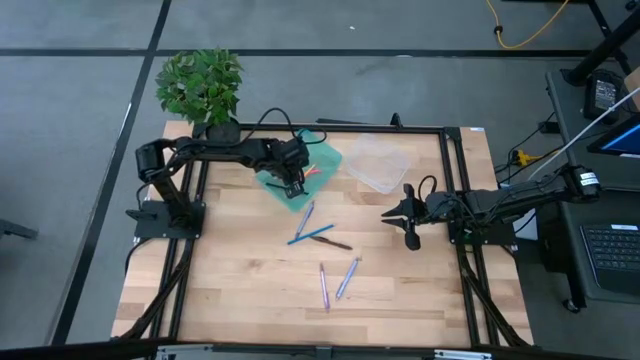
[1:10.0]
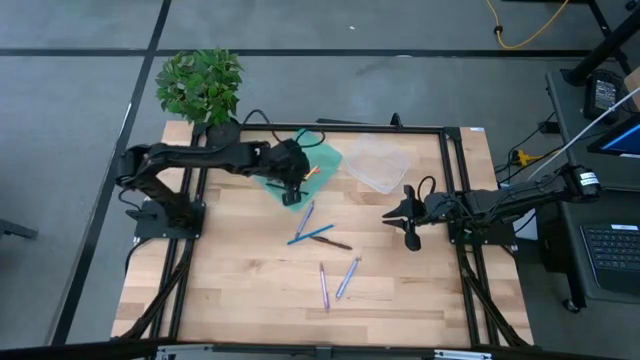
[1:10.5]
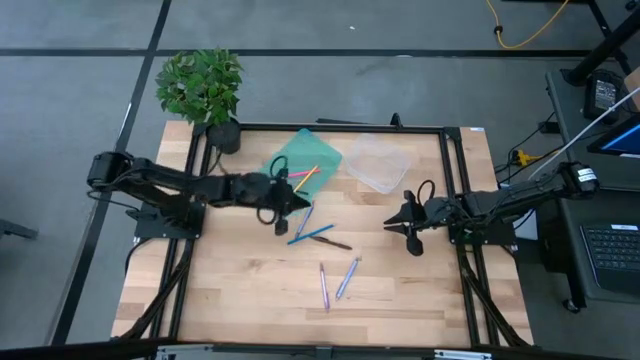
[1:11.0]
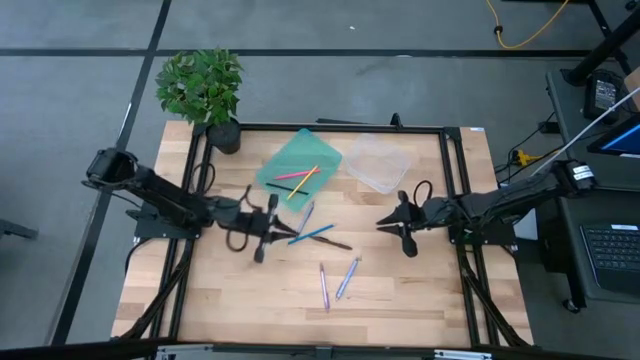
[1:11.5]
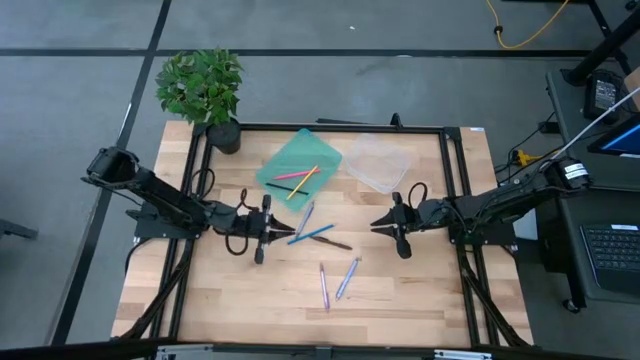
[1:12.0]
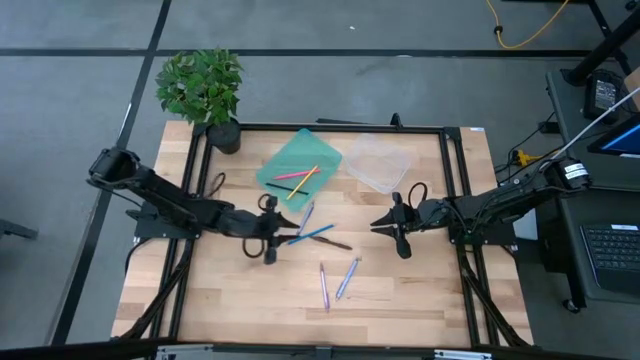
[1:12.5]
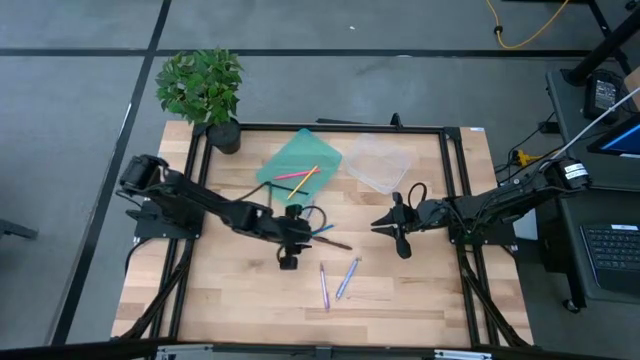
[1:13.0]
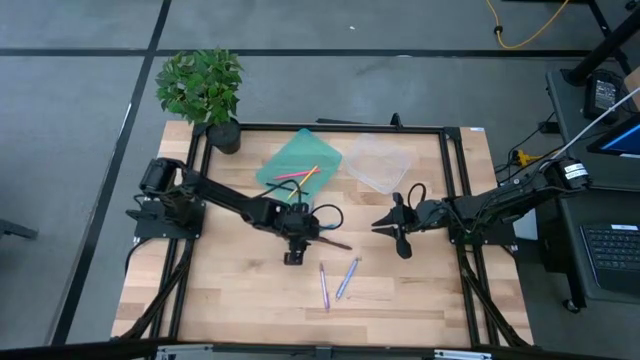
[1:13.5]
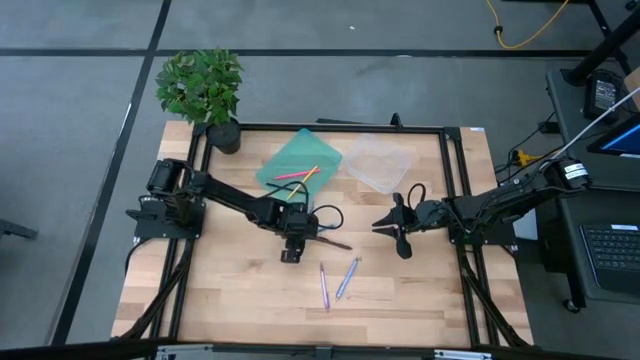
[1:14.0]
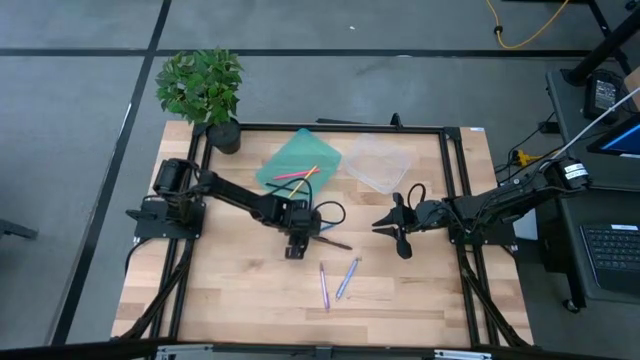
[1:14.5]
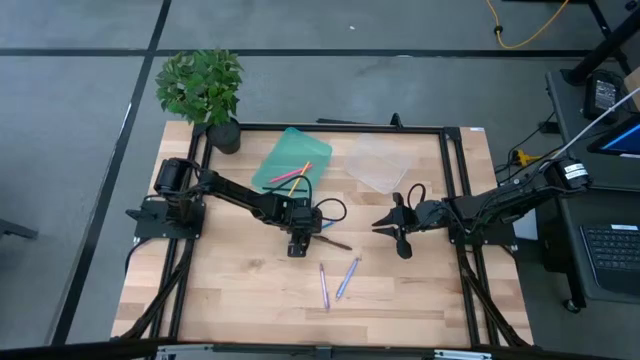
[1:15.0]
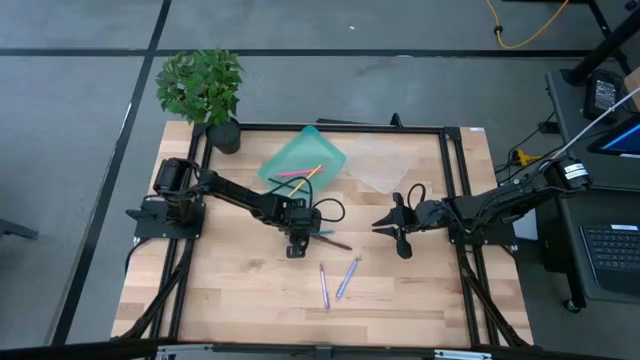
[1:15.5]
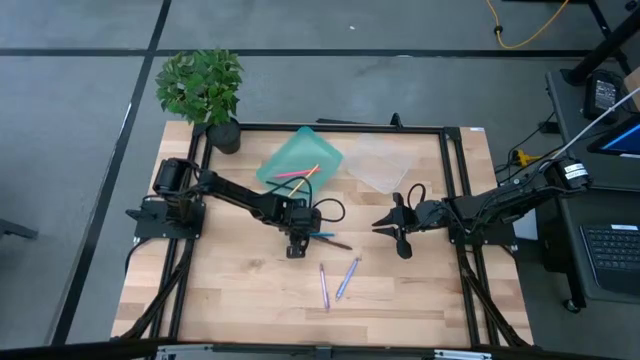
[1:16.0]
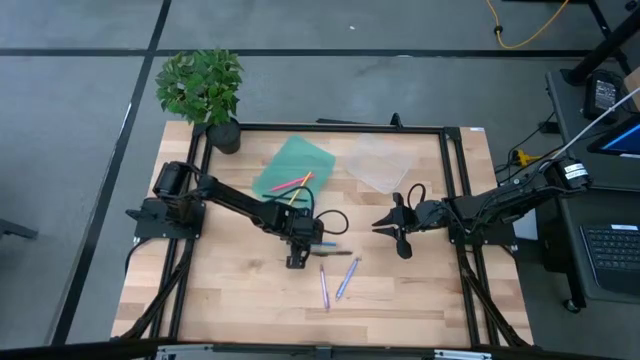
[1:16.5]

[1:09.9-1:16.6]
Task: Sort pens & pencils
Put the blue pencil into the blue bin

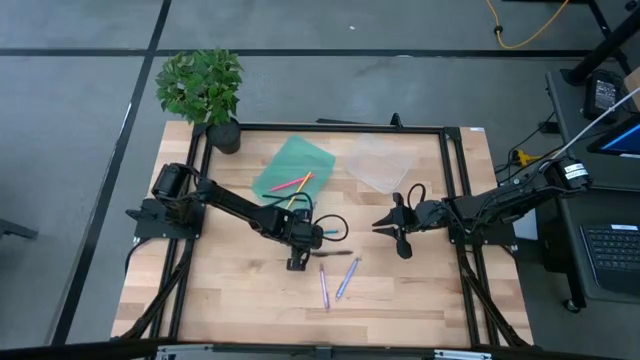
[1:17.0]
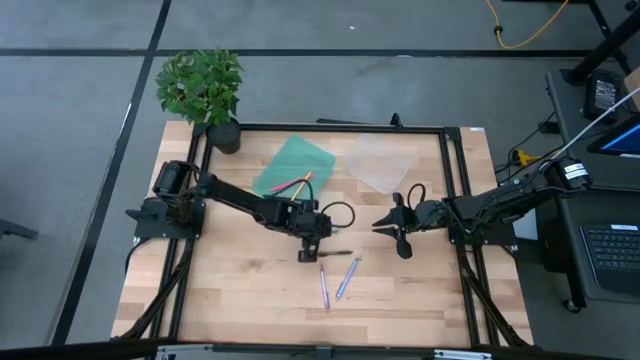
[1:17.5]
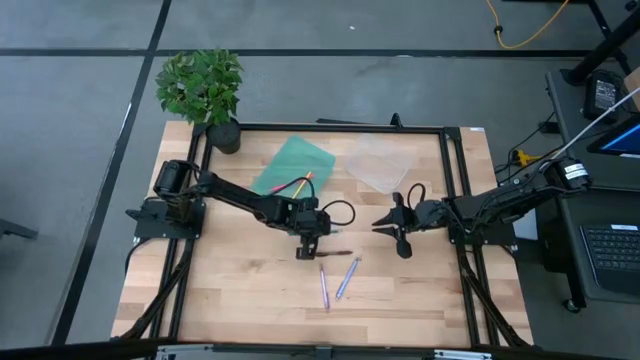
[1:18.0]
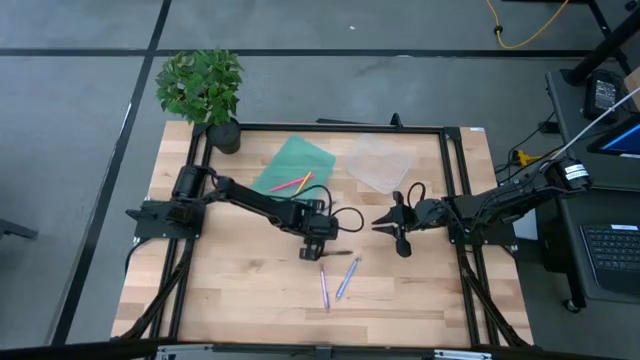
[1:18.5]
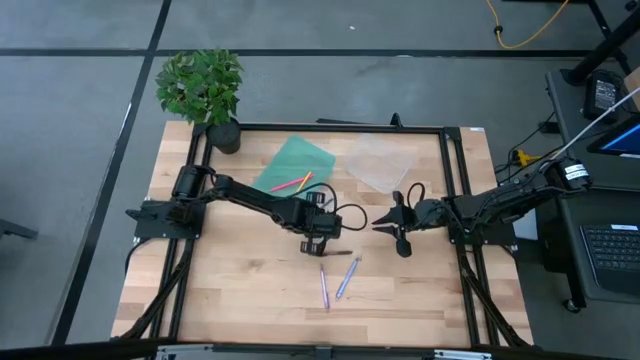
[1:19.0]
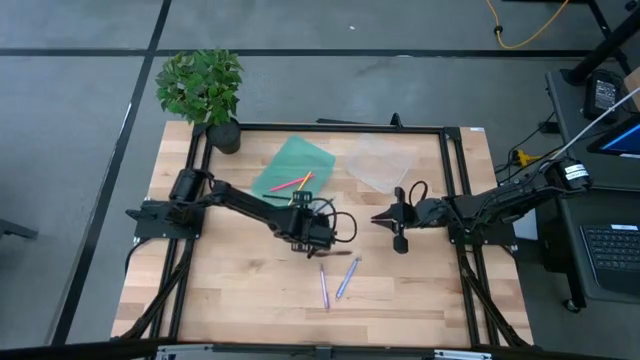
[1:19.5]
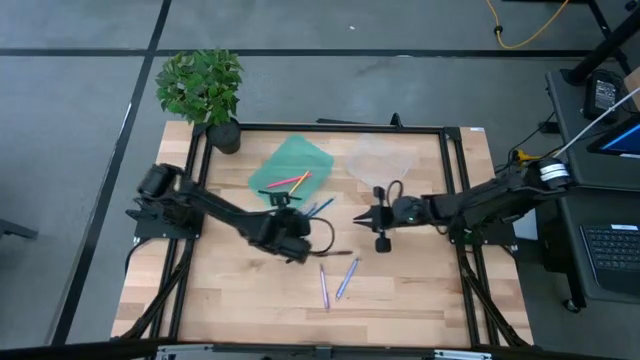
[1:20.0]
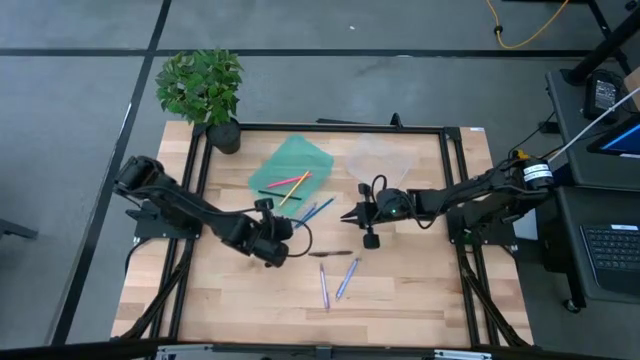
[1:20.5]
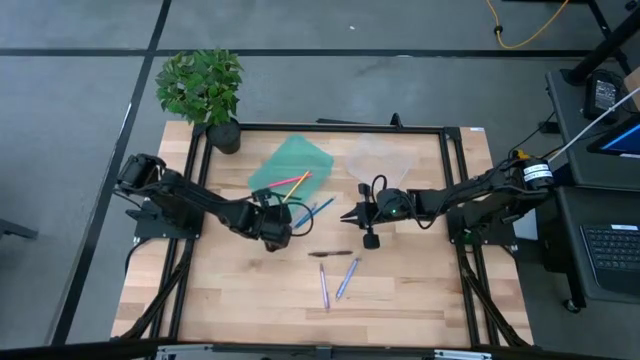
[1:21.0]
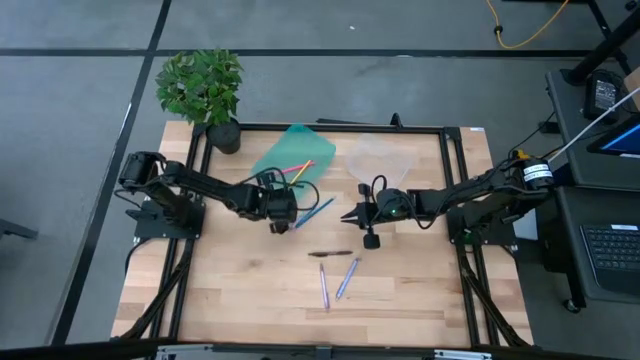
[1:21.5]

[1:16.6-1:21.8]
Adjust the blue bin

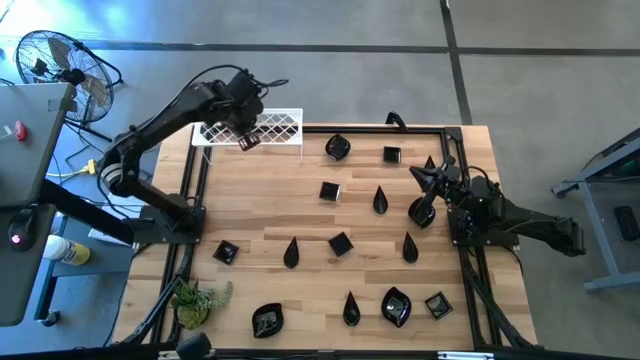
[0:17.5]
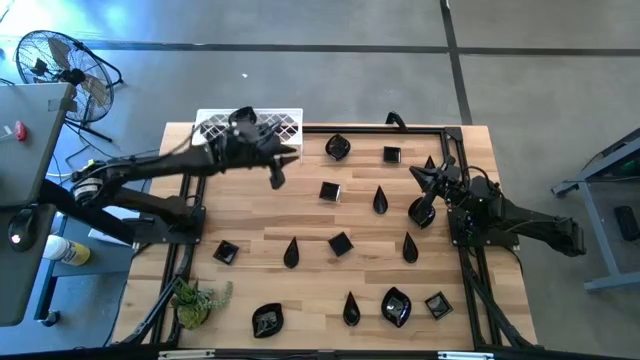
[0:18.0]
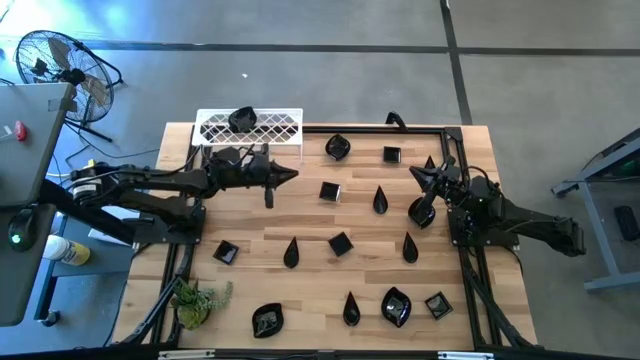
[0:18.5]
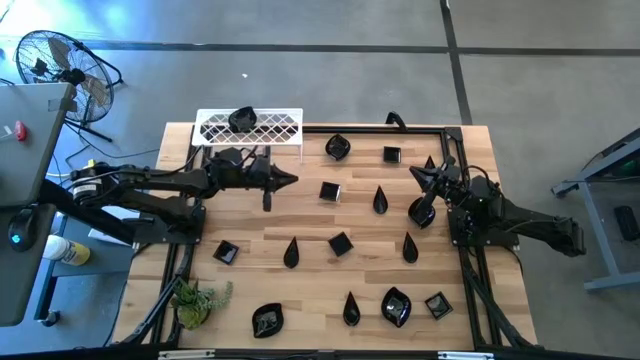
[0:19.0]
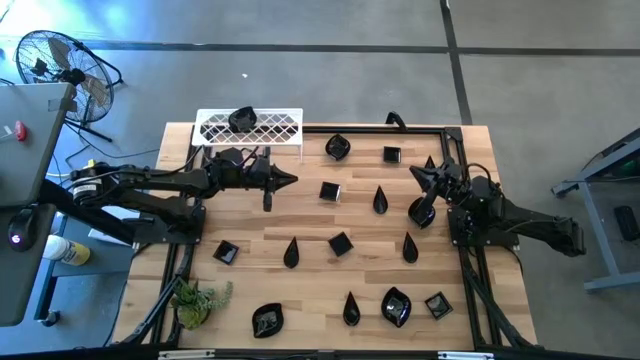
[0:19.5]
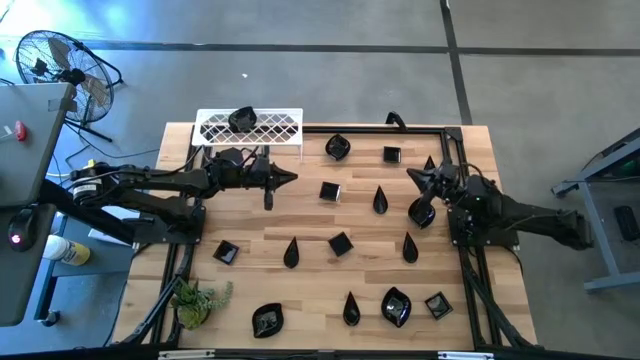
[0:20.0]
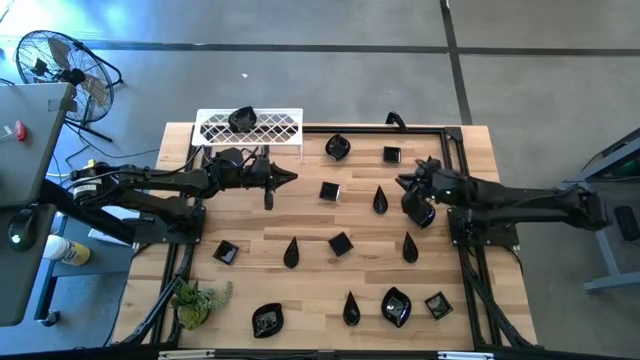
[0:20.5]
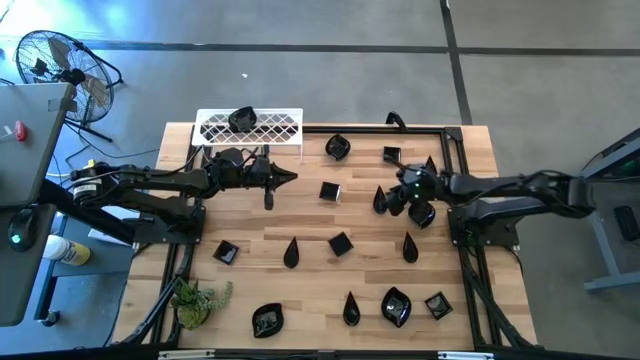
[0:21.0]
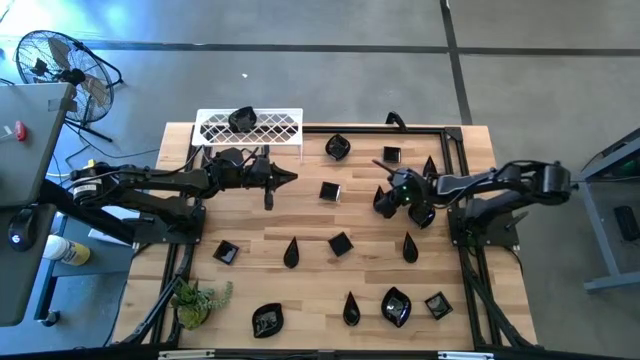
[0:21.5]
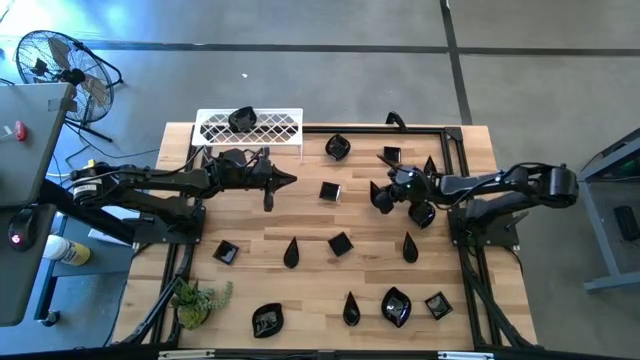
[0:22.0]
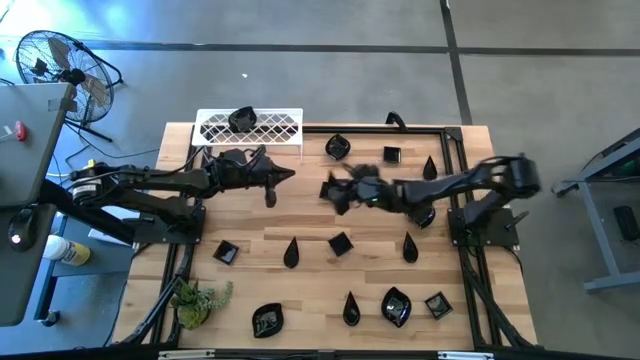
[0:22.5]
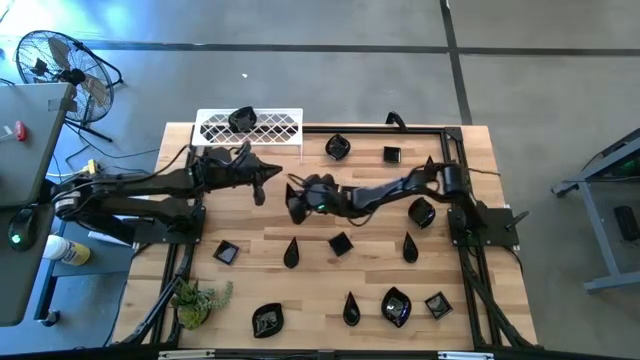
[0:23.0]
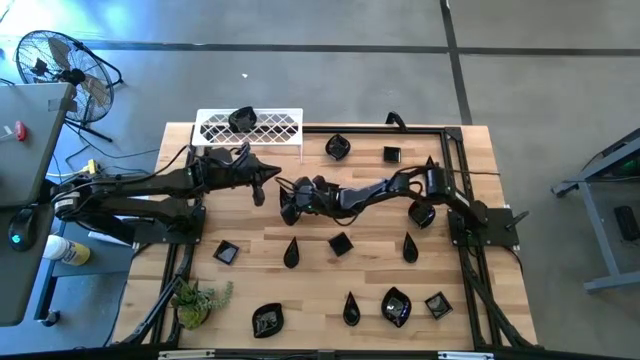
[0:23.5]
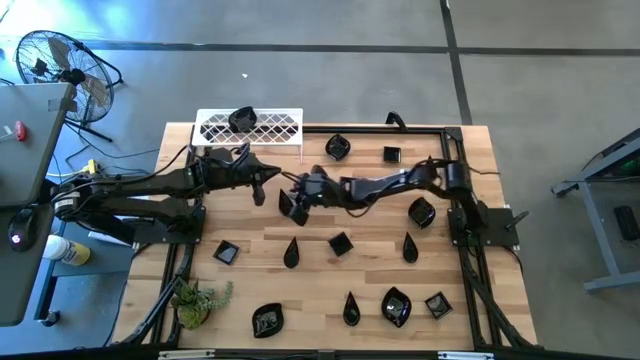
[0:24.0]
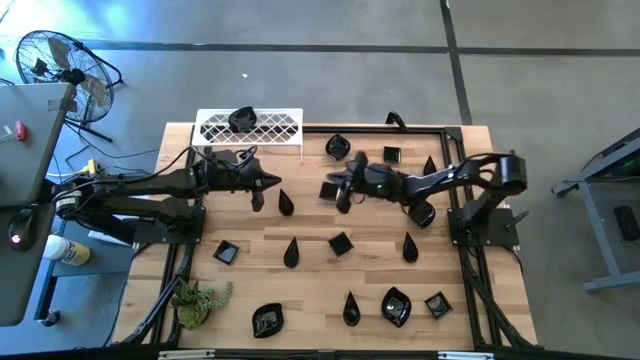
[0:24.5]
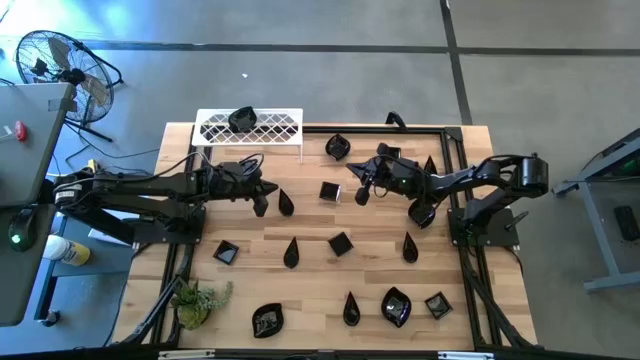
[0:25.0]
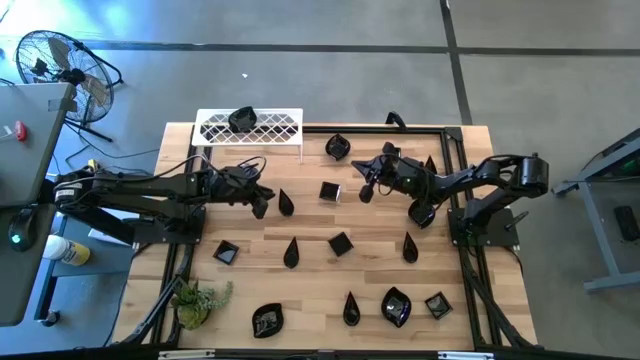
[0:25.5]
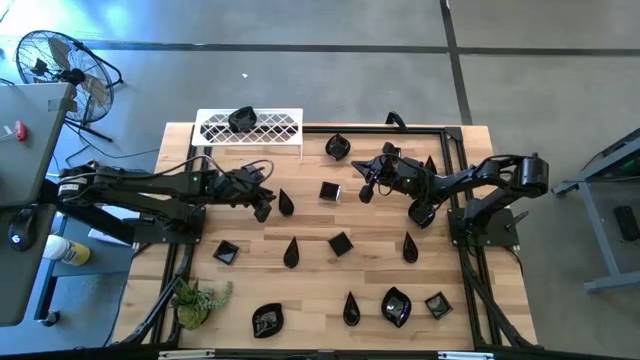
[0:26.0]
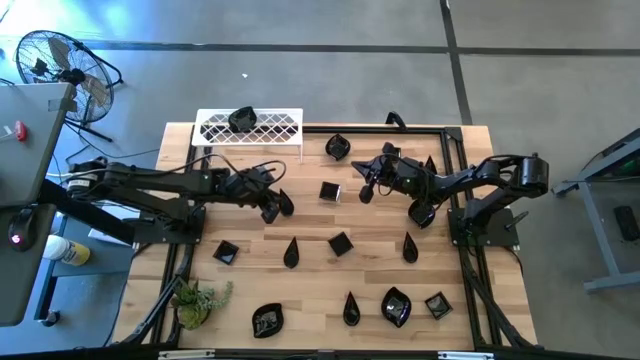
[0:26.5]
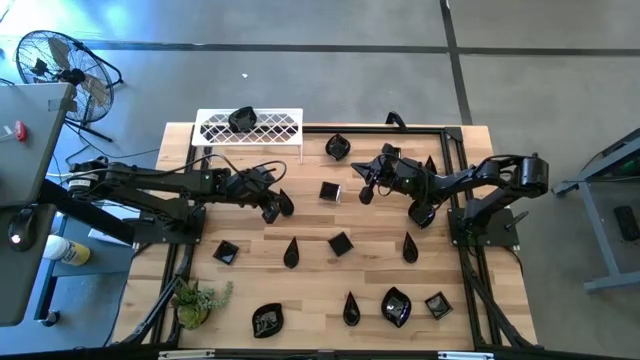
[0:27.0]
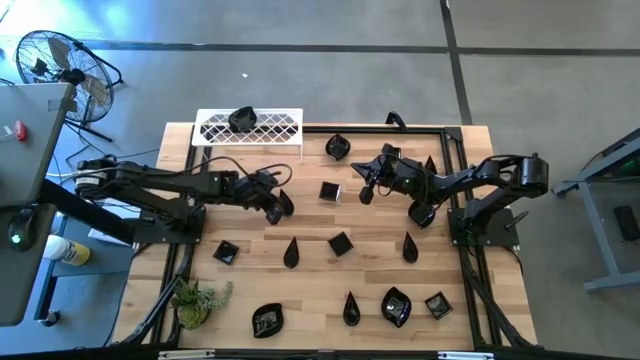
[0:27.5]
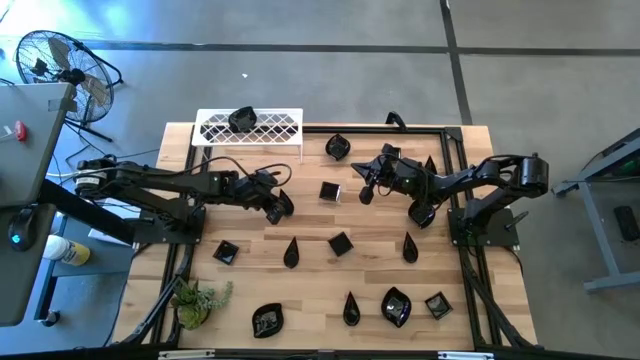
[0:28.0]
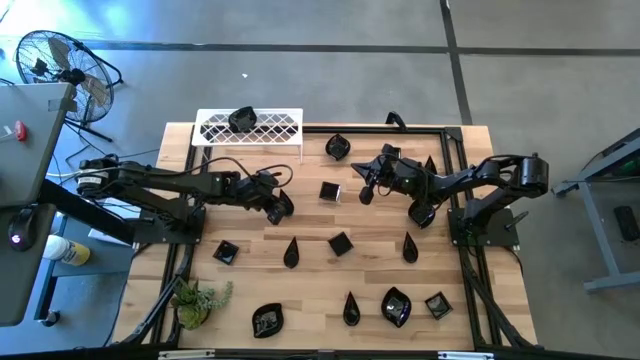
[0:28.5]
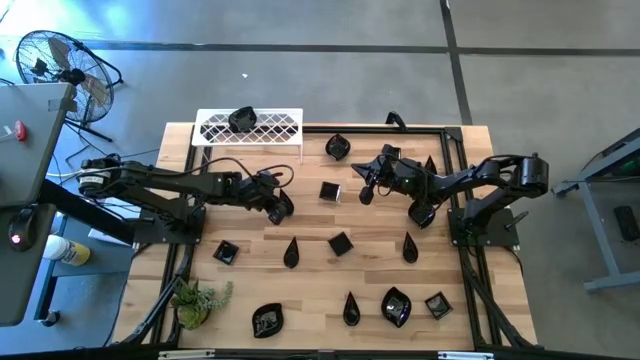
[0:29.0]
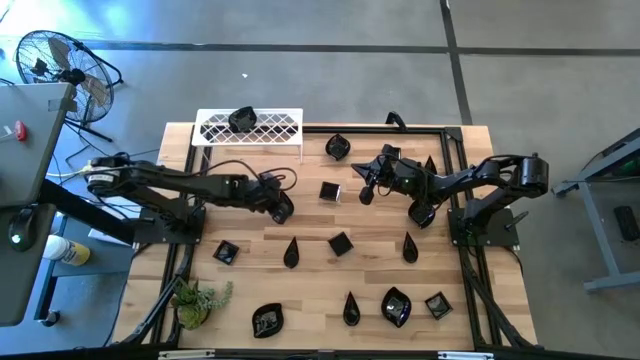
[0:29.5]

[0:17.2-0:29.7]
Task: Pick & Place Mini shaped plates
Put the drop-shaped plate on the shelf
